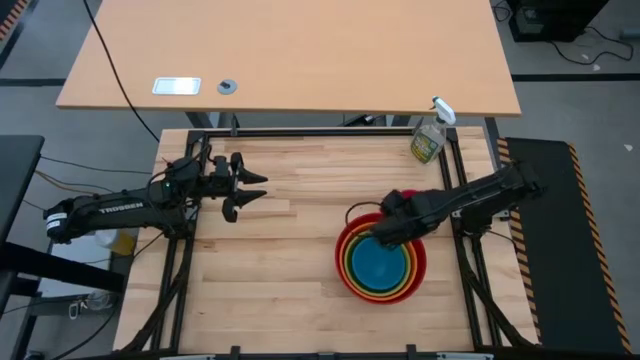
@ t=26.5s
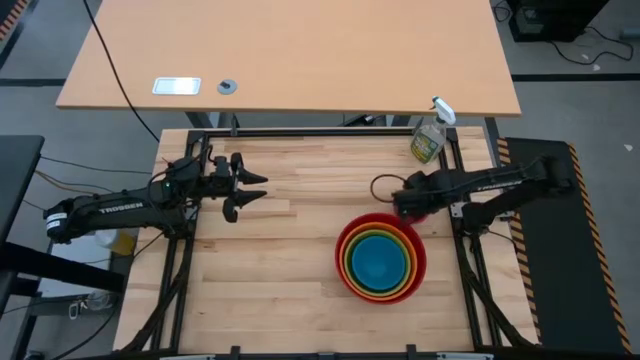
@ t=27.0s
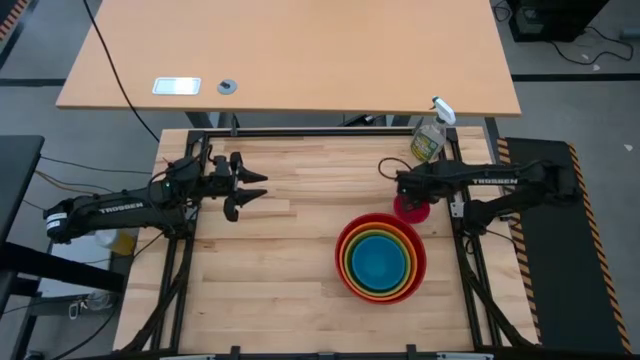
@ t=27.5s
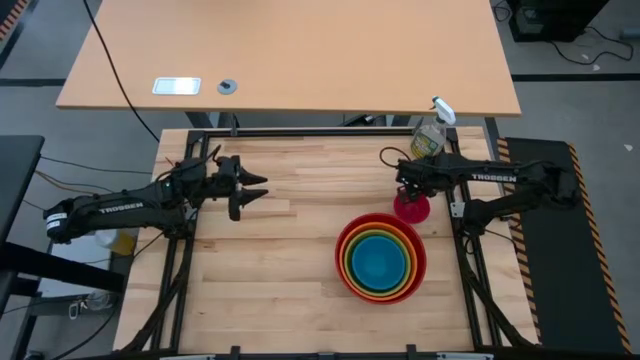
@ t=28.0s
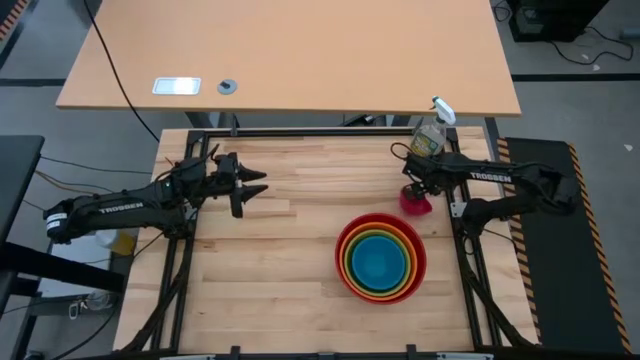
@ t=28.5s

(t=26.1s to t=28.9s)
Stack the red bowl on top of the blue bowl

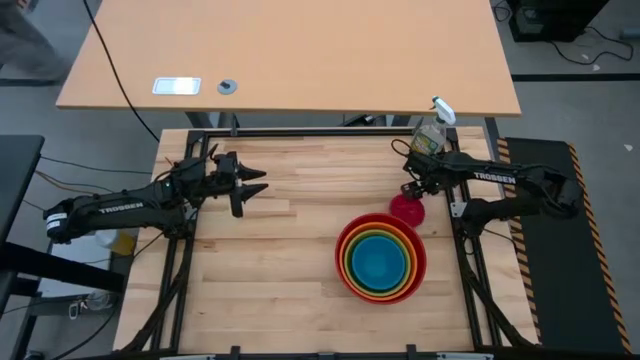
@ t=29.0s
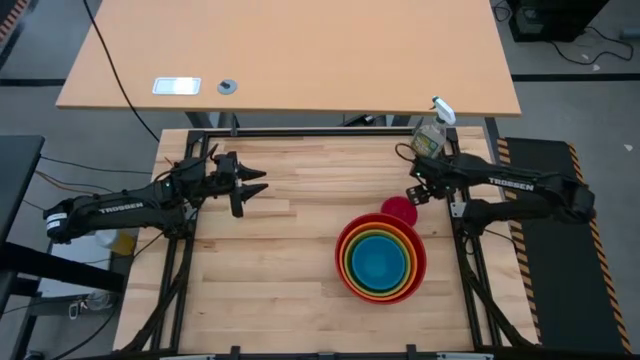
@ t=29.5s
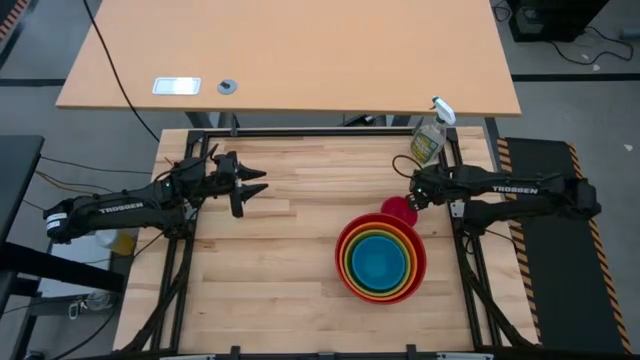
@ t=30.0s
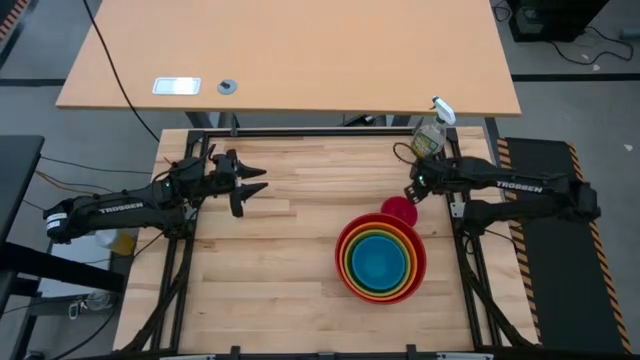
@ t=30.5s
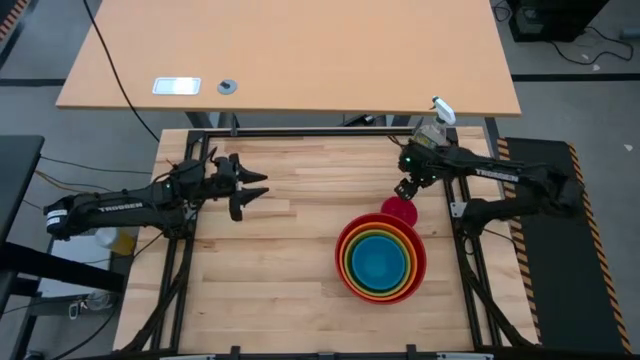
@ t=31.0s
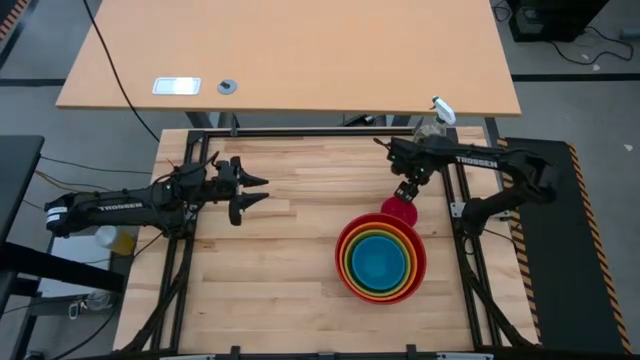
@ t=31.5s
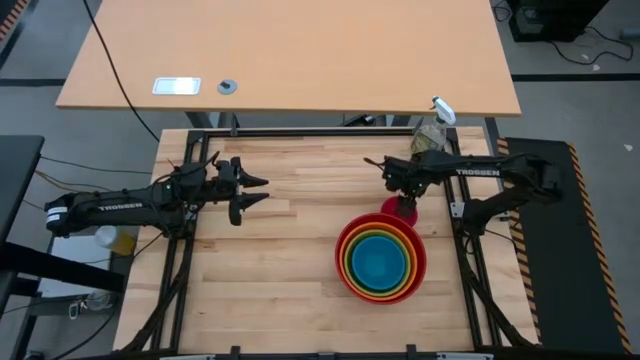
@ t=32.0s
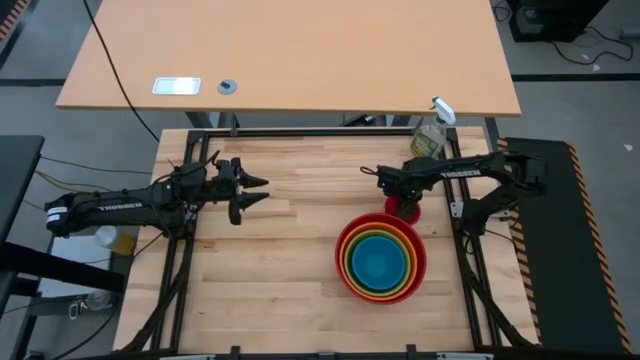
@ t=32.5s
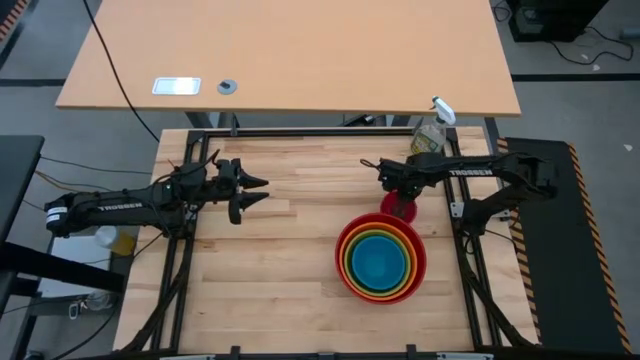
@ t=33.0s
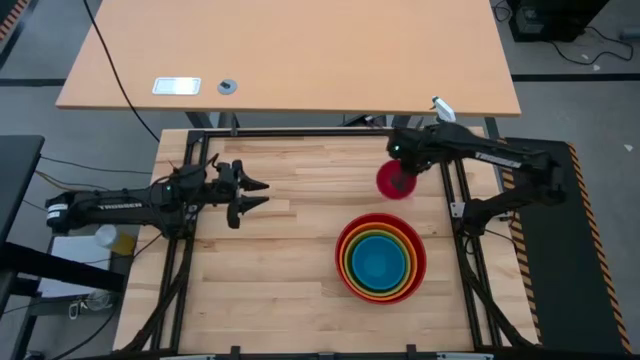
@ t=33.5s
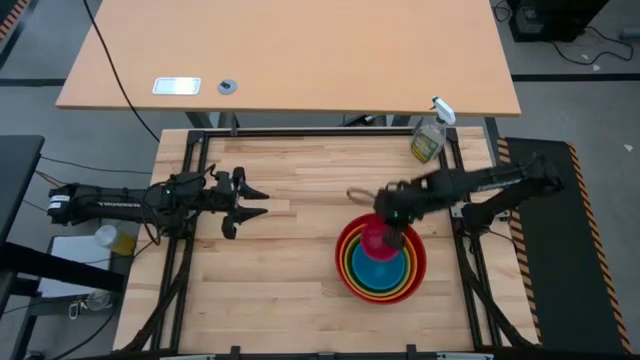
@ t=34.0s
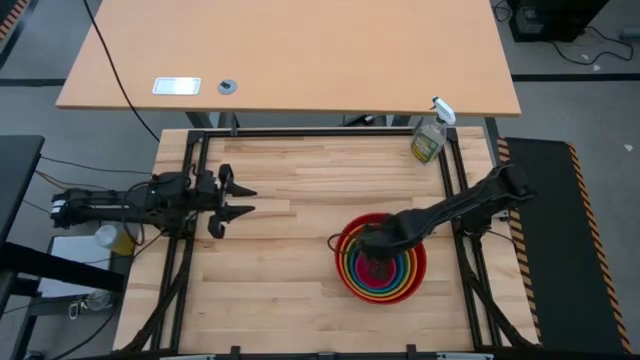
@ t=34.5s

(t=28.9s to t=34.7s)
Stack the red bowl on top of the blue bowl

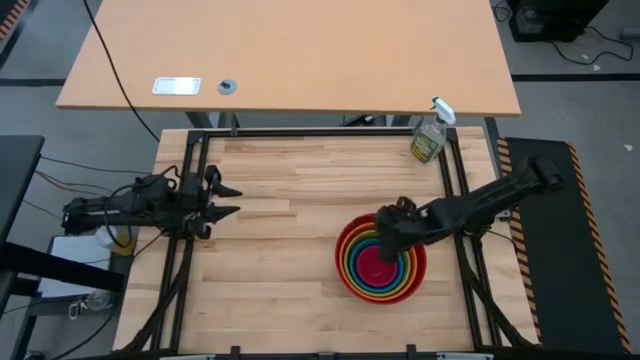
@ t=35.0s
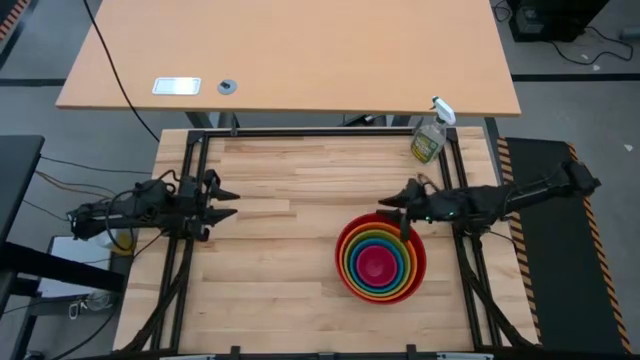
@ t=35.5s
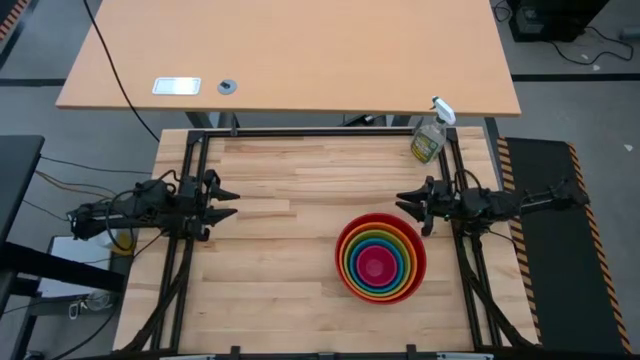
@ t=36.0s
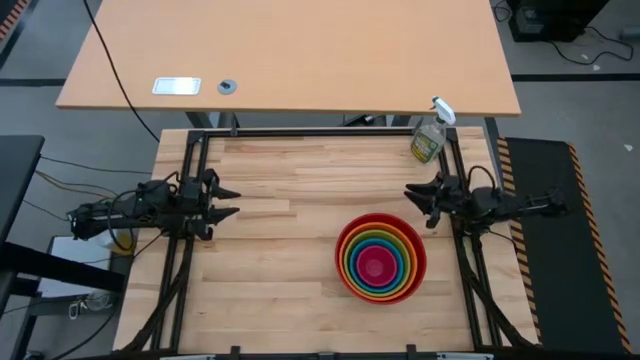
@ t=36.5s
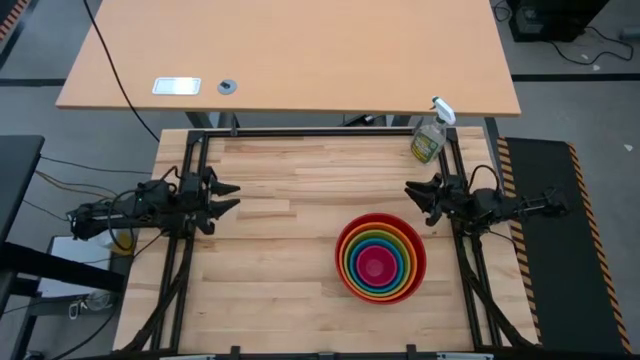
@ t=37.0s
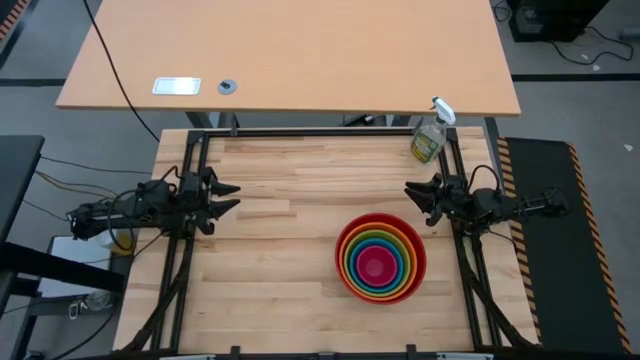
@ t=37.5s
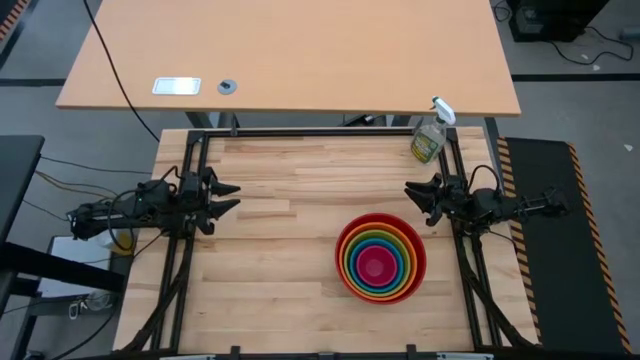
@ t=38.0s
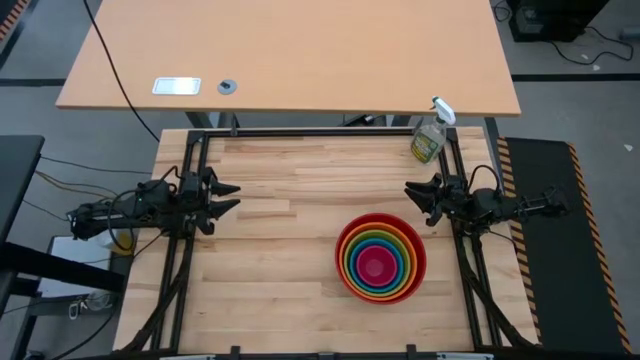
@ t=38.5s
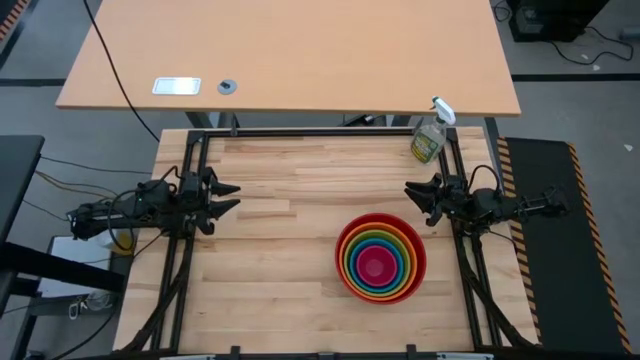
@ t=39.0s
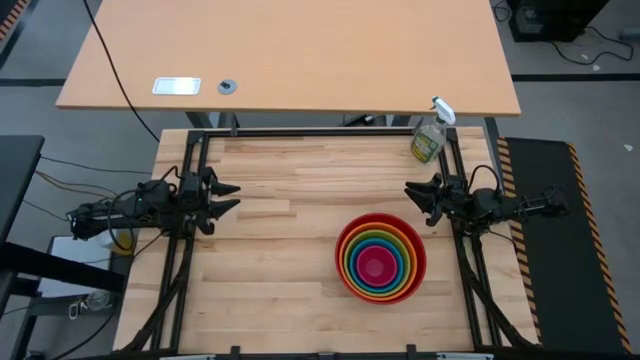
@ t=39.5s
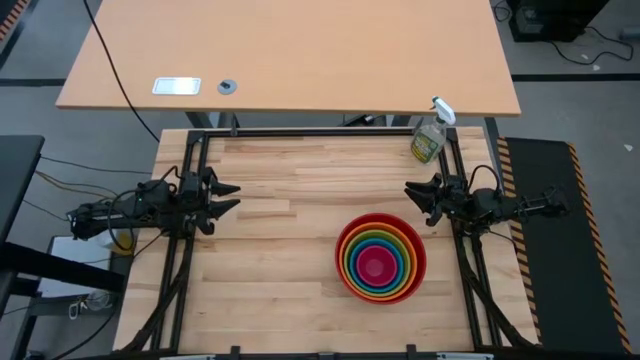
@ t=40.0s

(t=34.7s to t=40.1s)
Return to Home Position

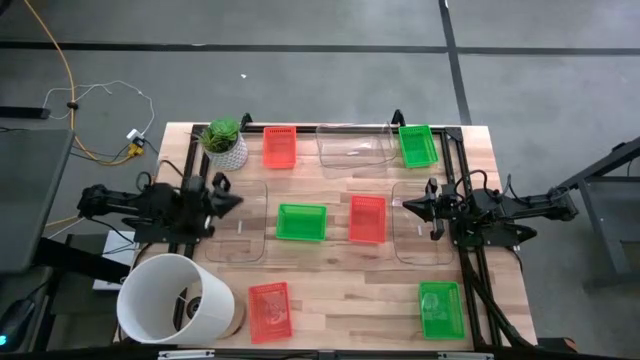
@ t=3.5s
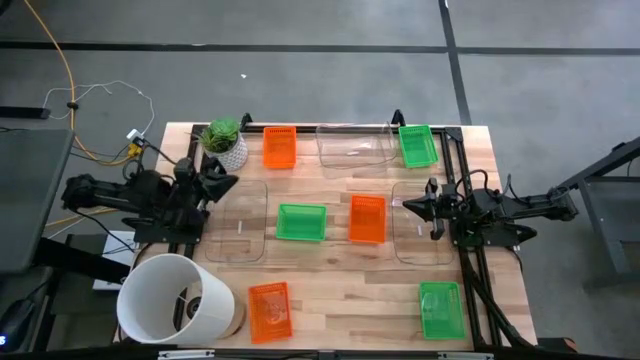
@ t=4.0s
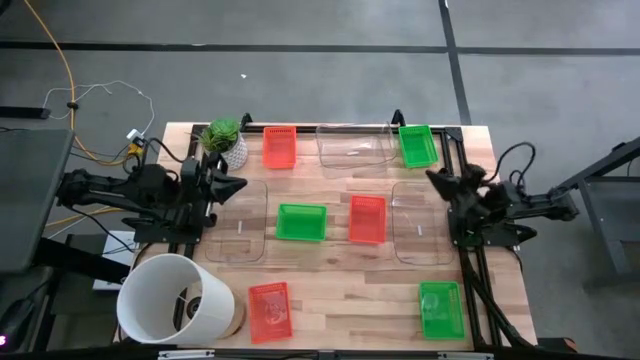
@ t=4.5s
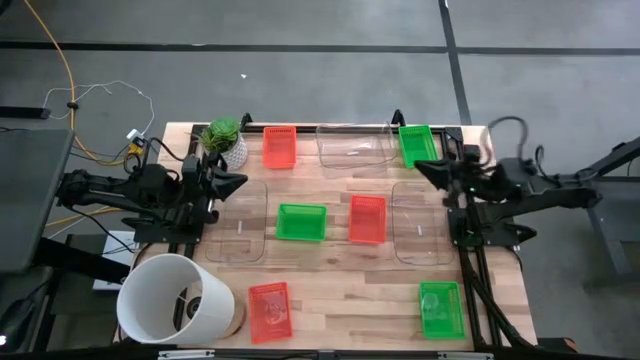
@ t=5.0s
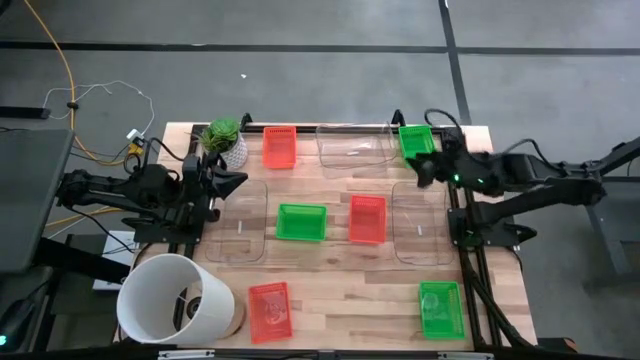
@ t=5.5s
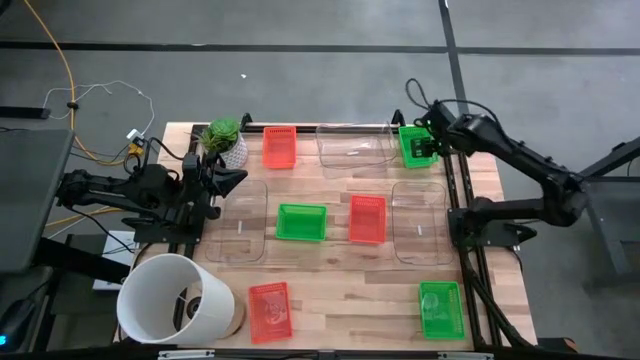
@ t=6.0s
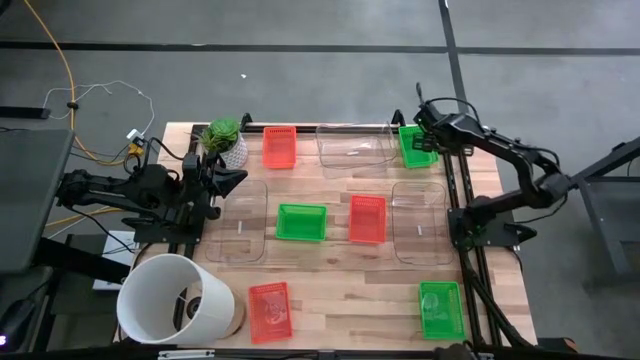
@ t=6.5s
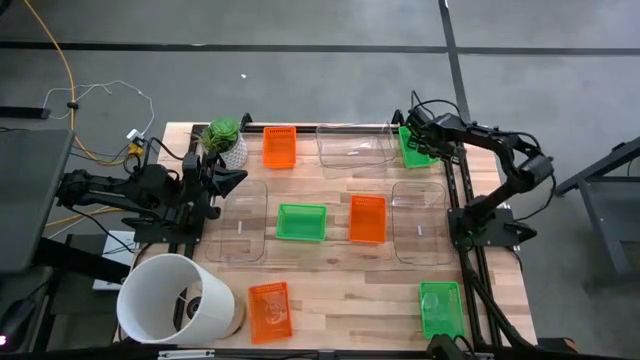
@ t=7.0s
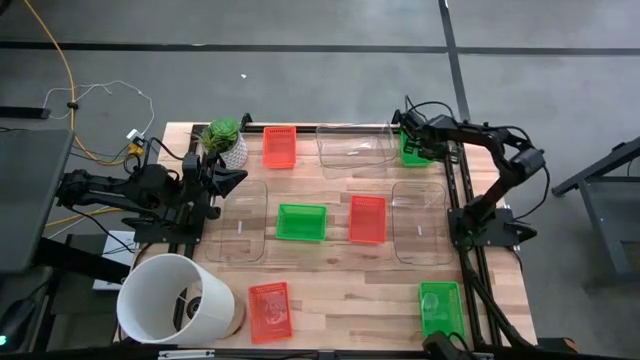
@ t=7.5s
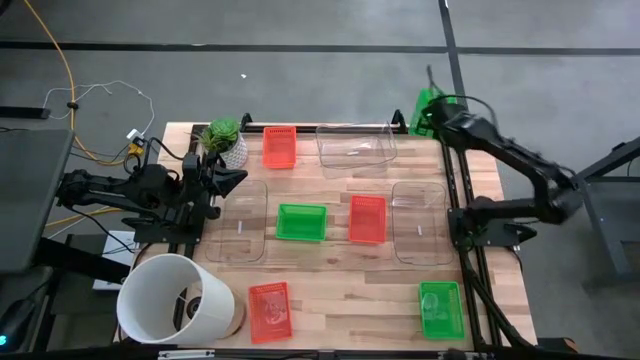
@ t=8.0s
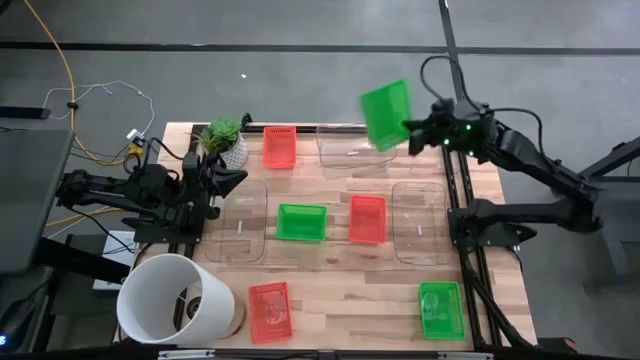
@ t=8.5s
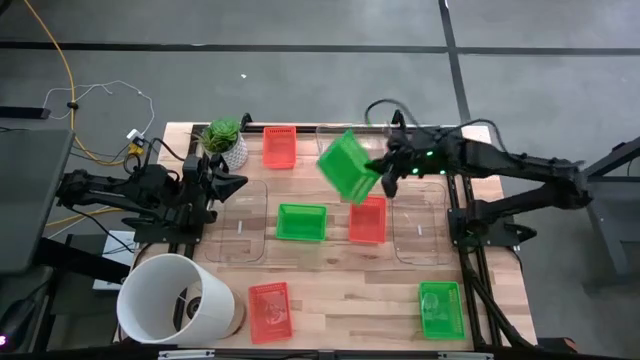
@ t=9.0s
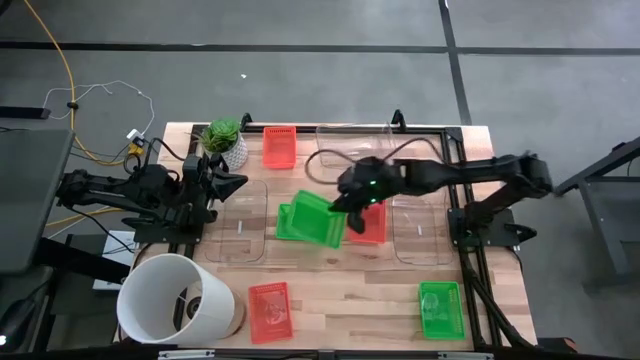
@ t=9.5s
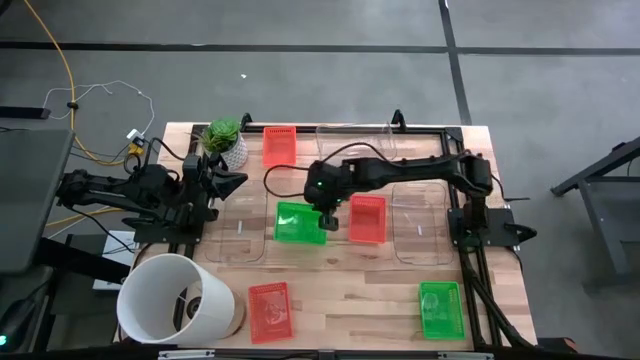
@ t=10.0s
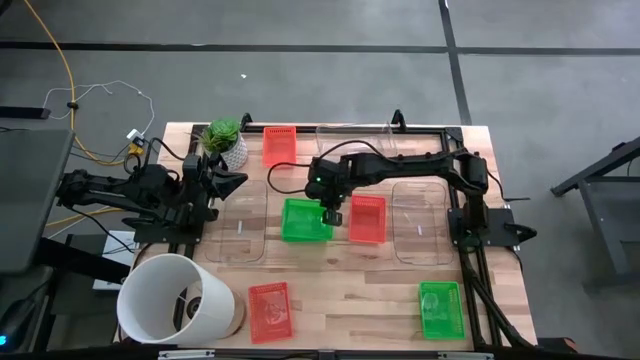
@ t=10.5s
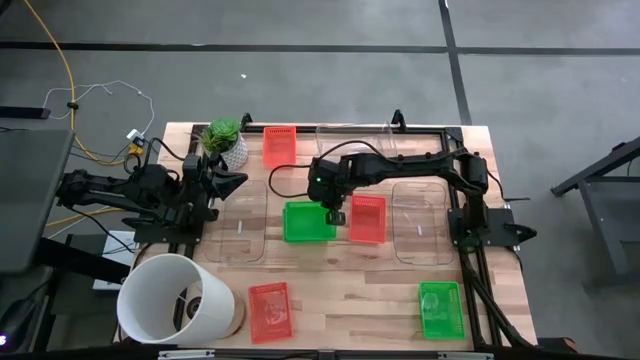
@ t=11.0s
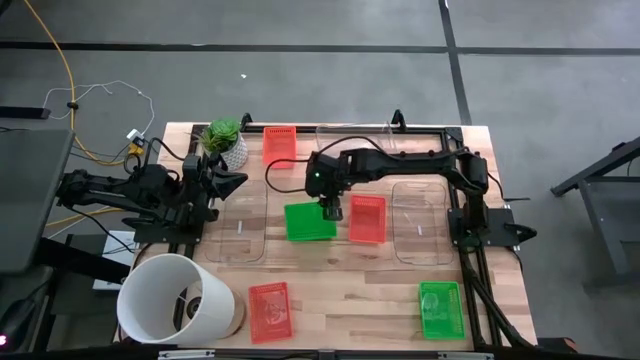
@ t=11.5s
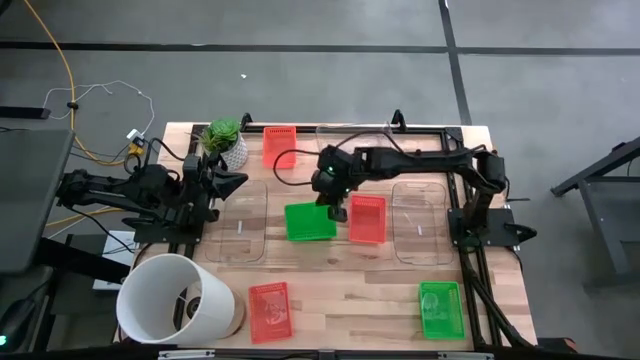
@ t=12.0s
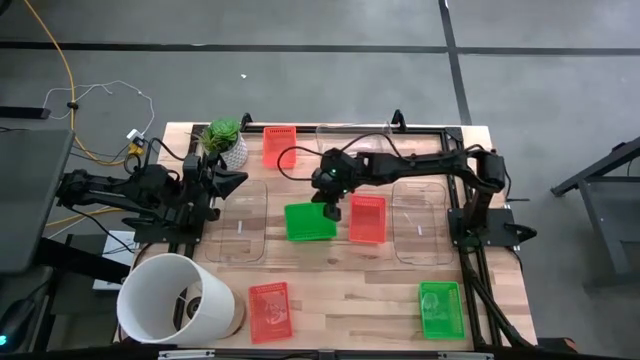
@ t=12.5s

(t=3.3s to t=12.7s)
Stack the top green bin on the middle green bin
